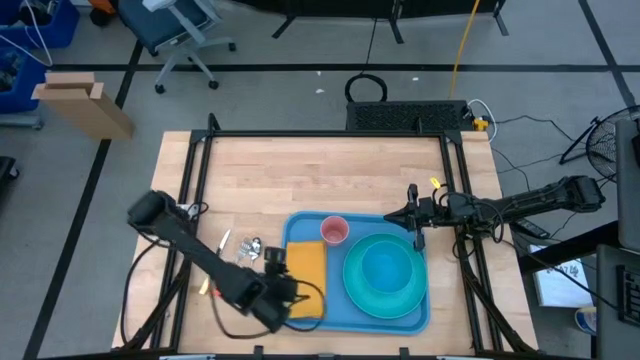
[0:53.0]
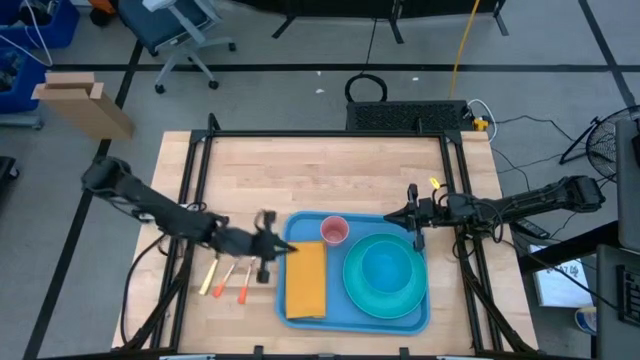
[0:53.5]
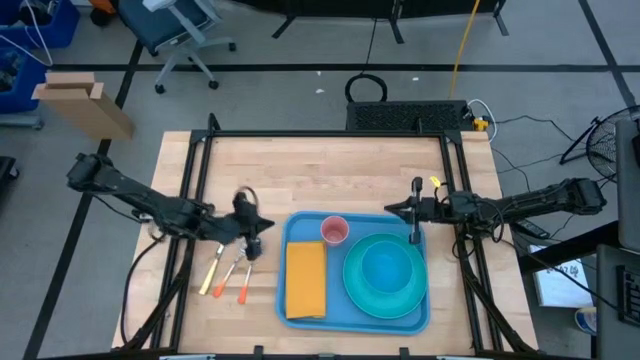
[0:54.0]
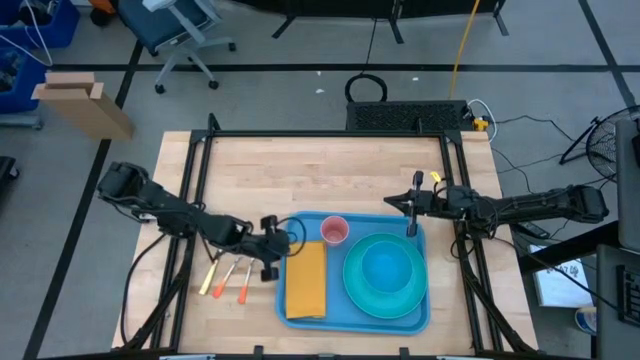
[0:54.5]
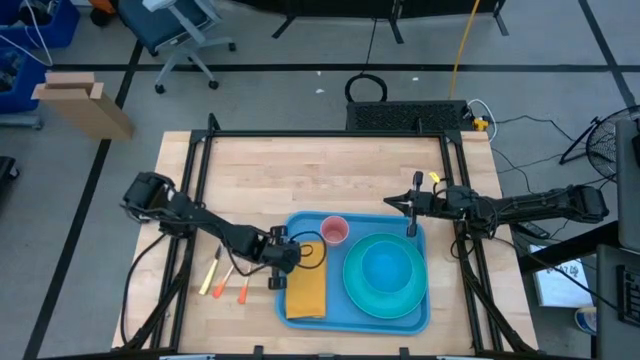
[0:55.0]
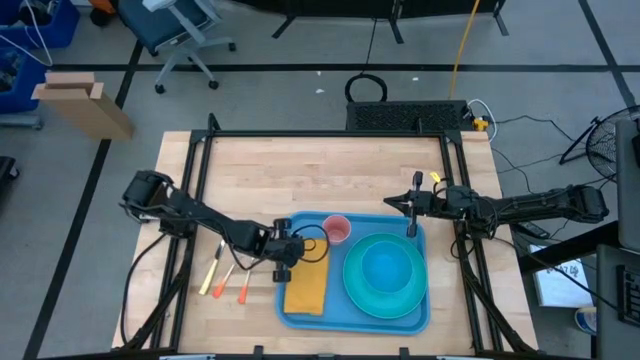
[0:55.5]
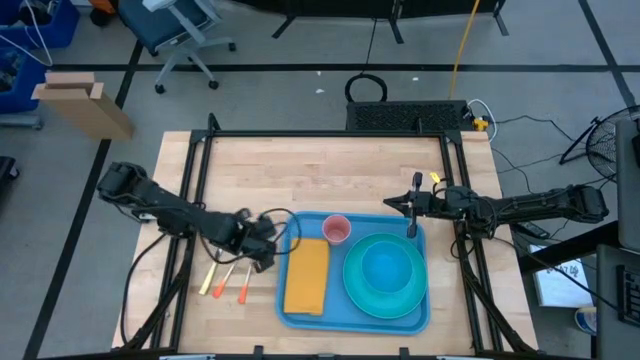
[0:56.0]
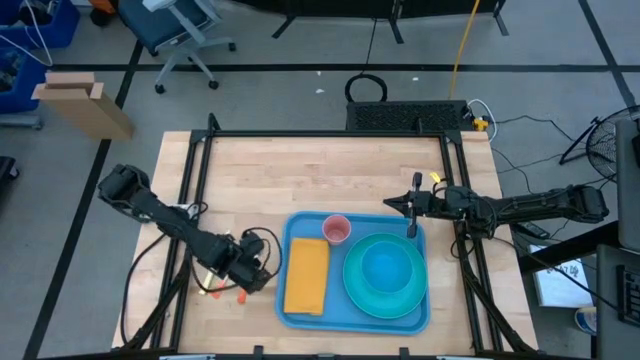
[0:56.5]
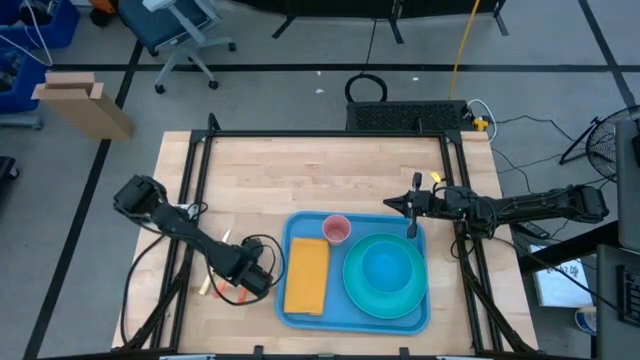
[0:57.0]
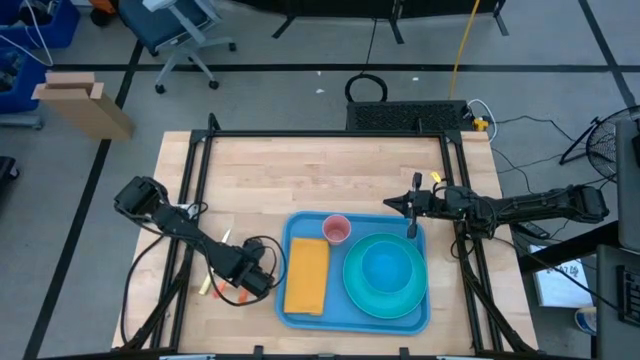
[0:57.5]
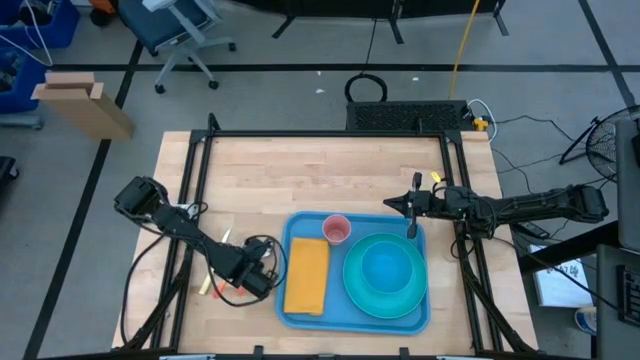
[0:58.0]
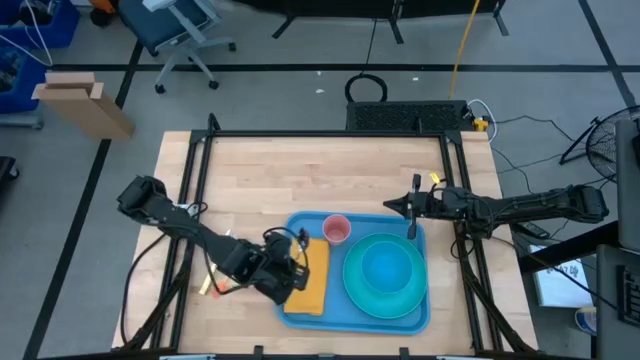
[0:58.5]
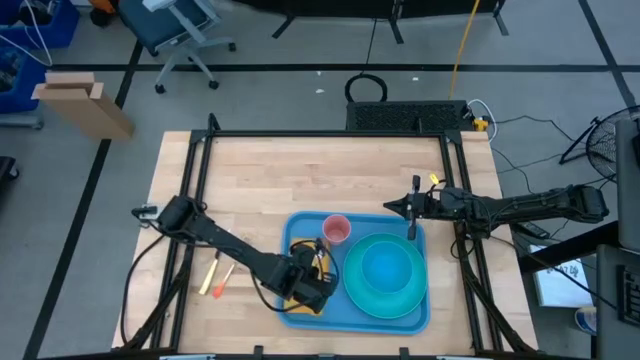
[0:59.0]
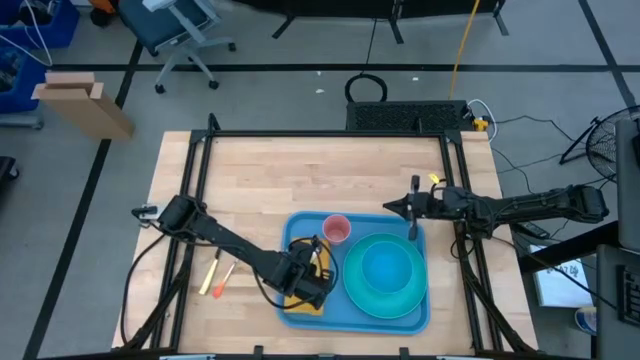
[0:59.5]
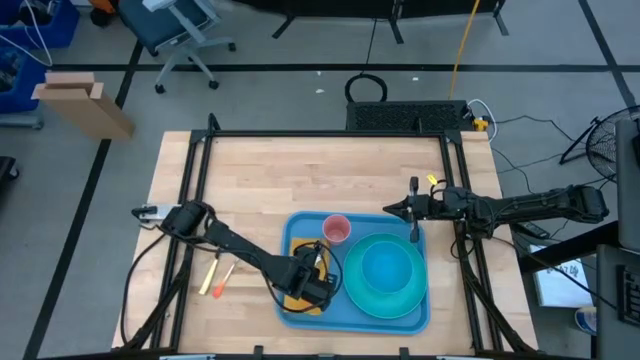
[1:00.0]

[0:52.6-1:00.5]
Task: Set up tray
Put the spoon on top of the yellow napkin

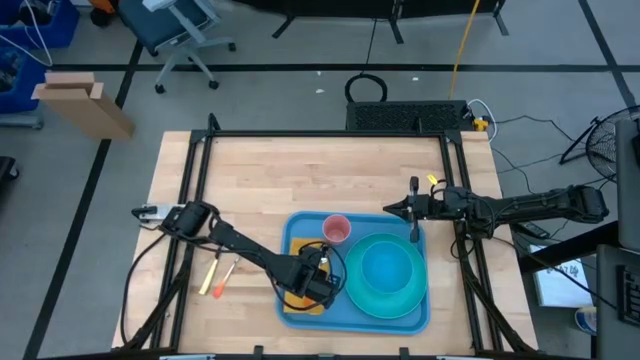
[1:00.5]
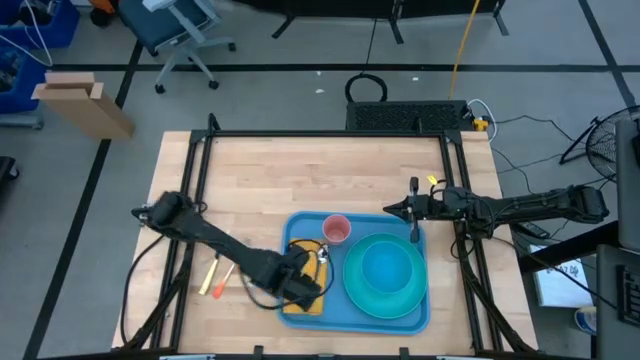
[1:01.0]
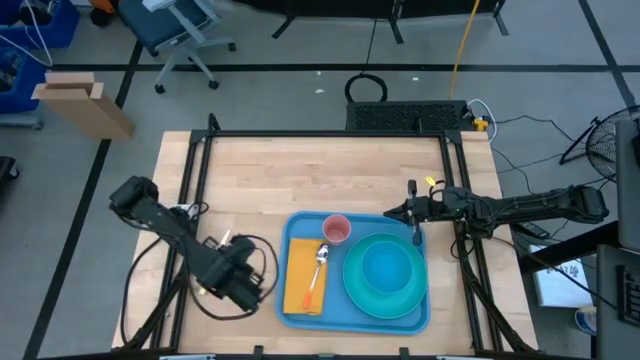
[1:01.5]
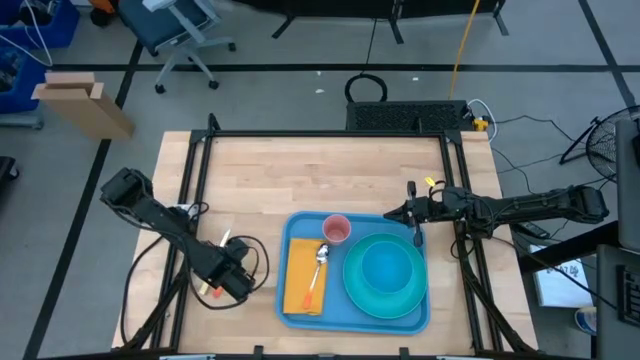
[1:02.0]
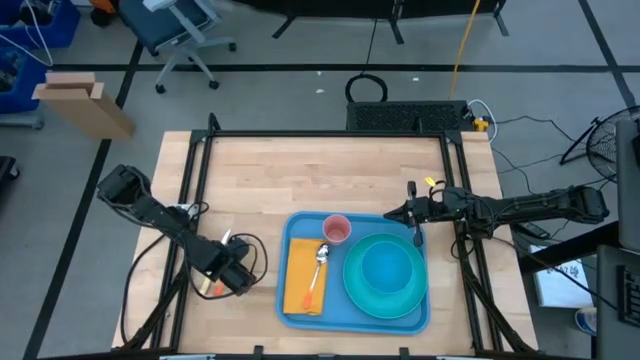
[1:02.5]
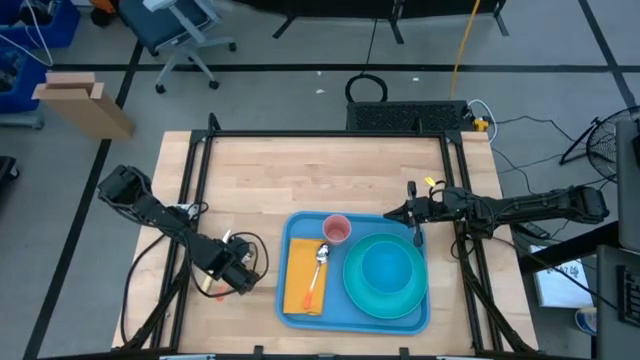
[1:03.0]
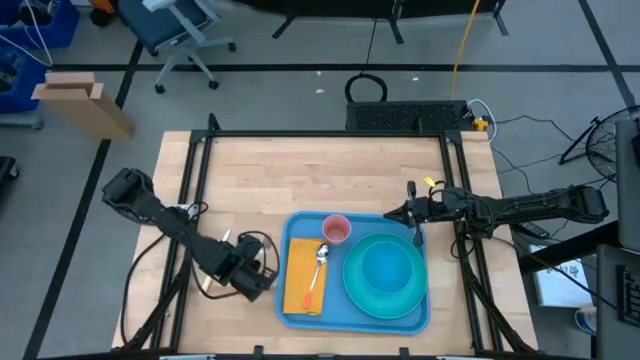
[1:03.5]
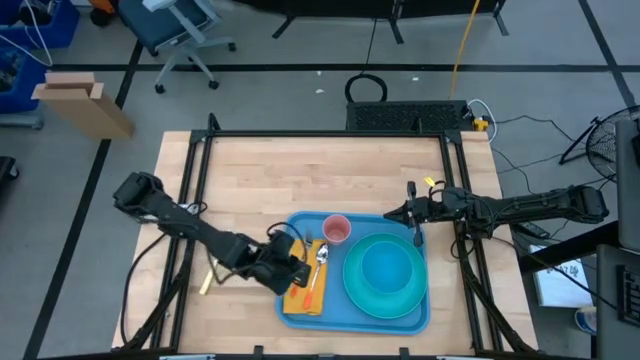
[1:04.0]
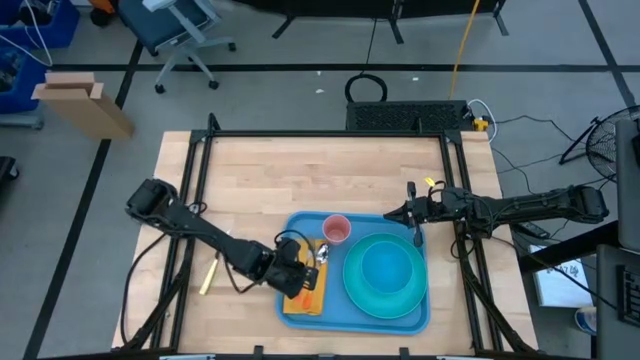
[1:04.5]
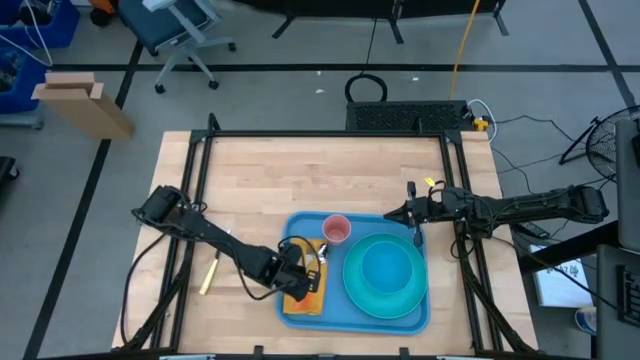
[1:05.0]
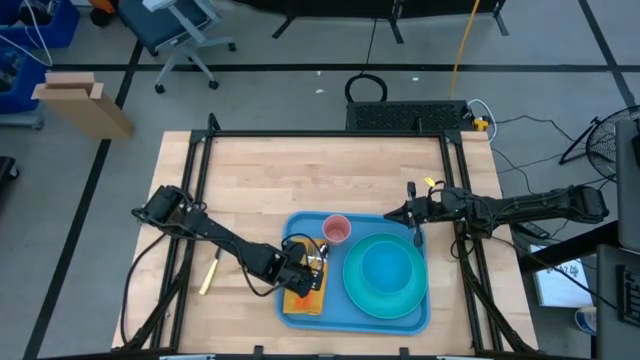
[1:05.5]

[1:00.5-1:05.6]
Put the fork on top of the yellow napkin

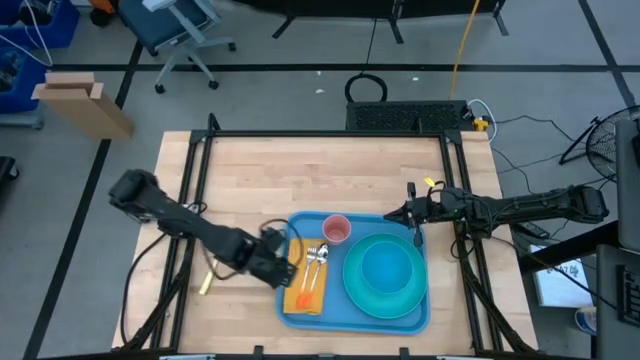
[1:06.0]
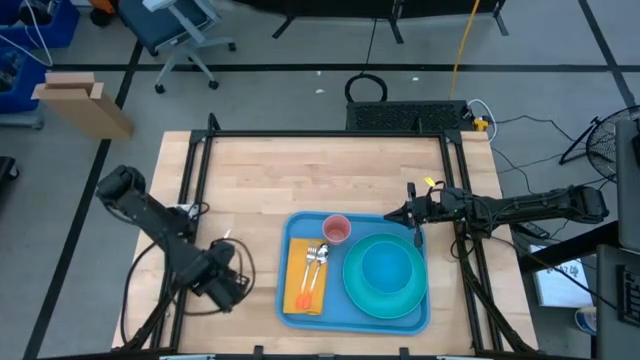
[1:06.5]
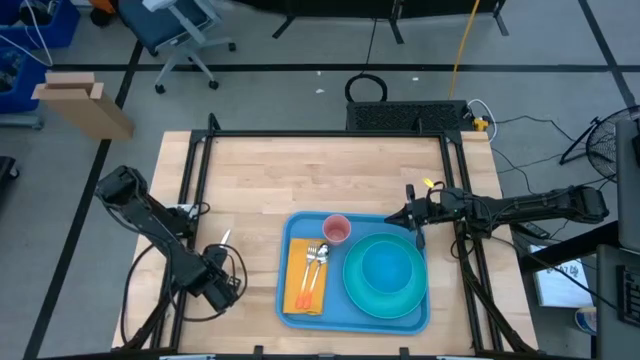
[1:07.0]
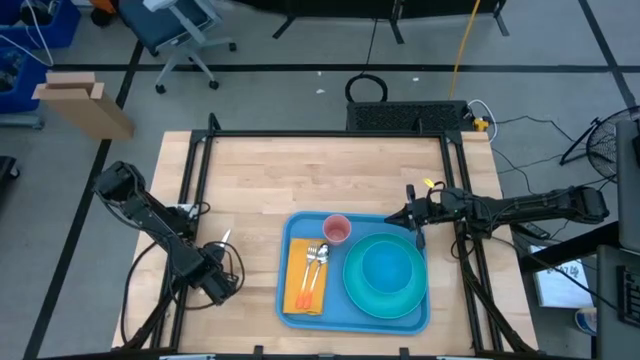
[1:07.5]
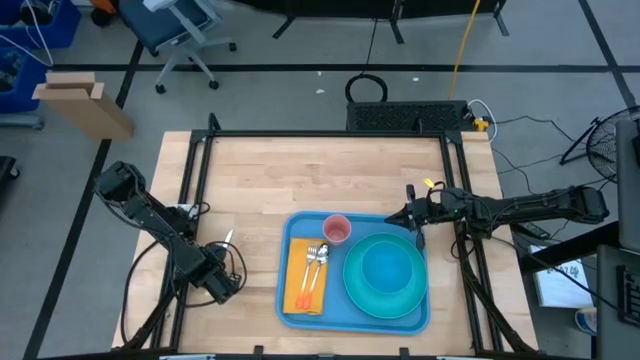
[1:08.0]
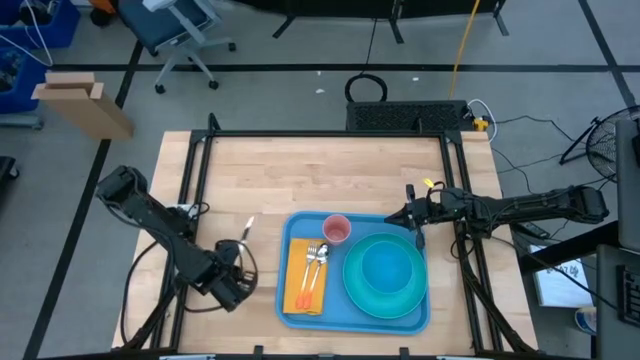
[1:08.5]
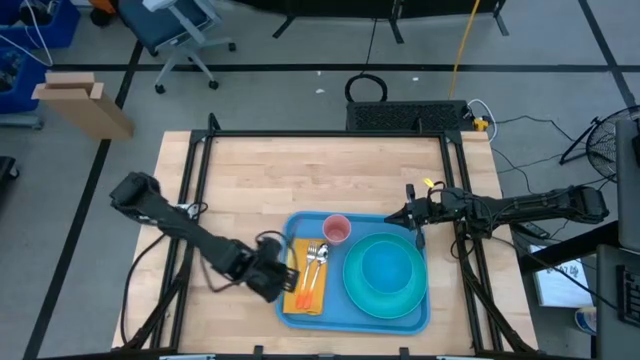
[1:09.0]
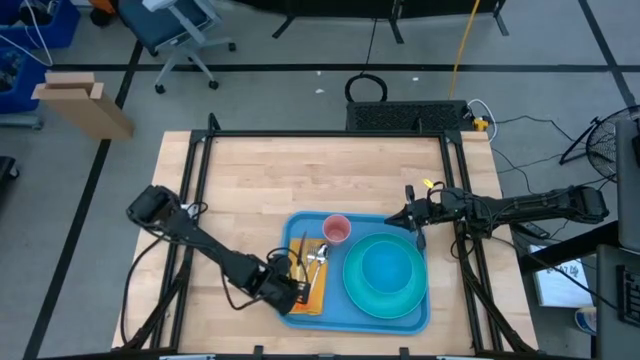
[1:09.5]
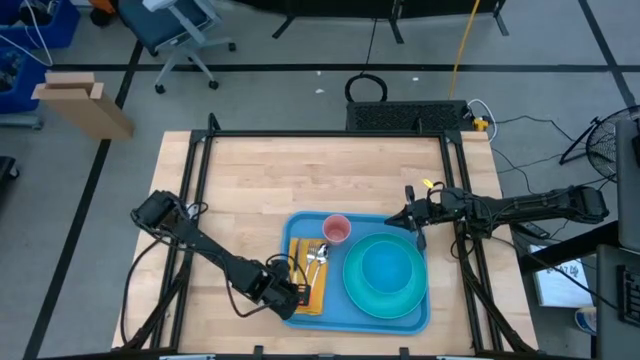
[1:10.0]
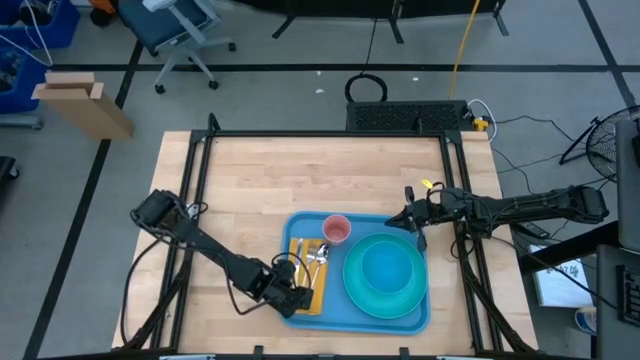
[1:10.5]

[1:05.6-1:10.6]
Put the knife on top of the yellow napkin

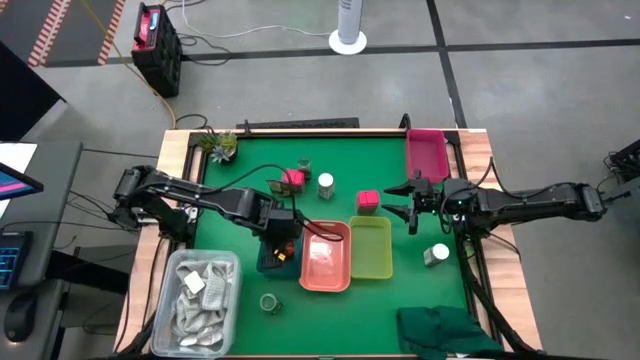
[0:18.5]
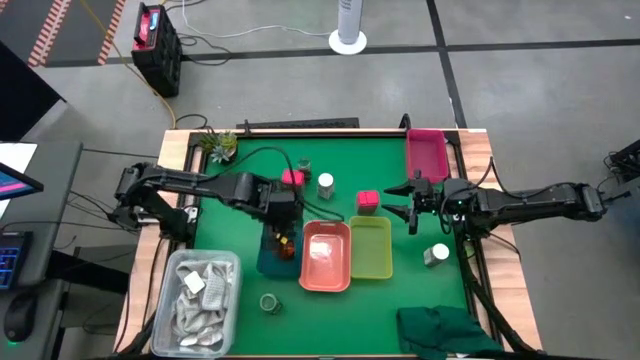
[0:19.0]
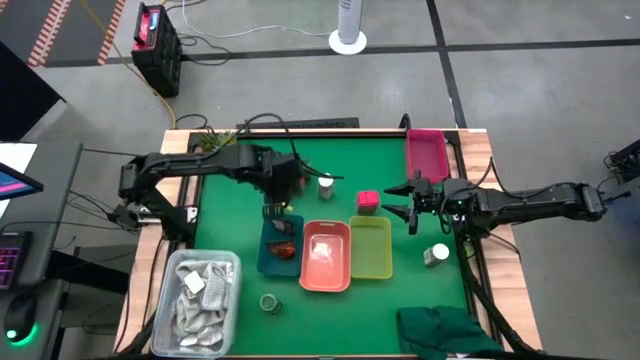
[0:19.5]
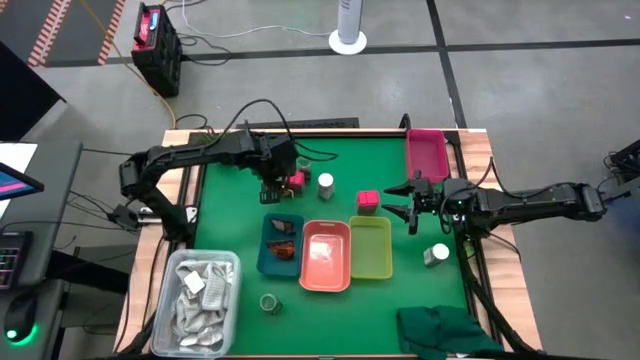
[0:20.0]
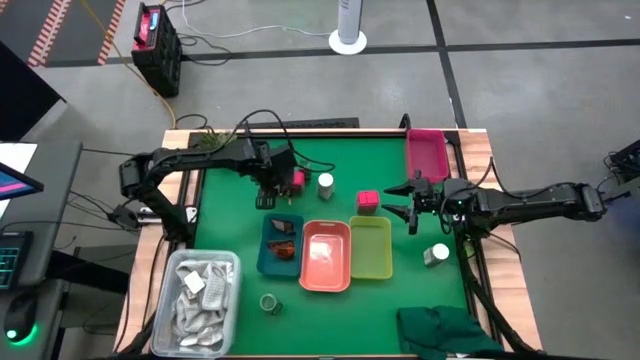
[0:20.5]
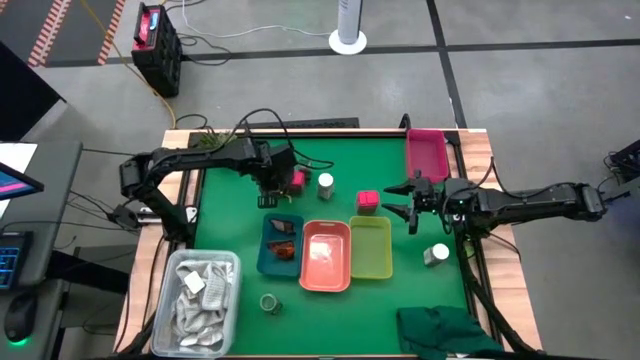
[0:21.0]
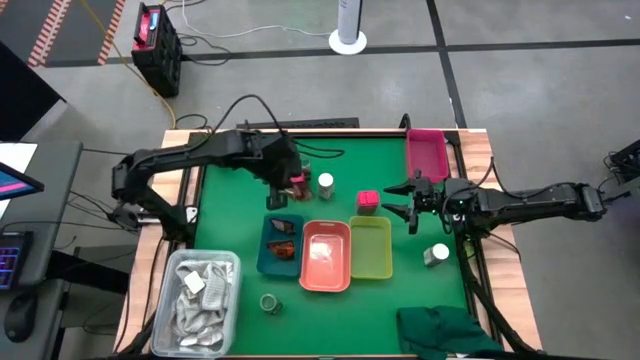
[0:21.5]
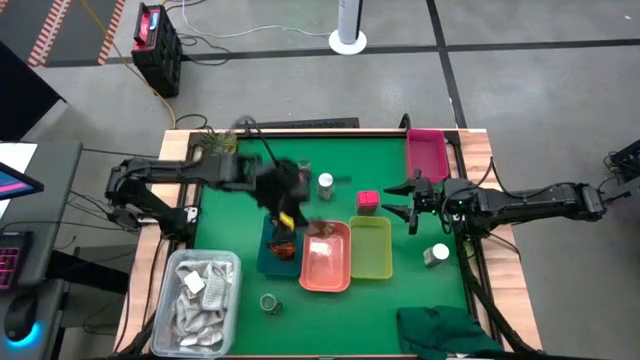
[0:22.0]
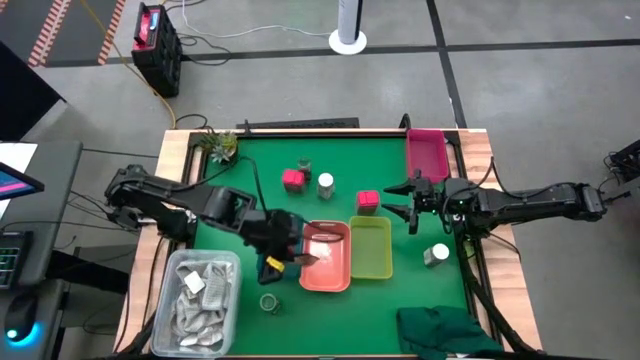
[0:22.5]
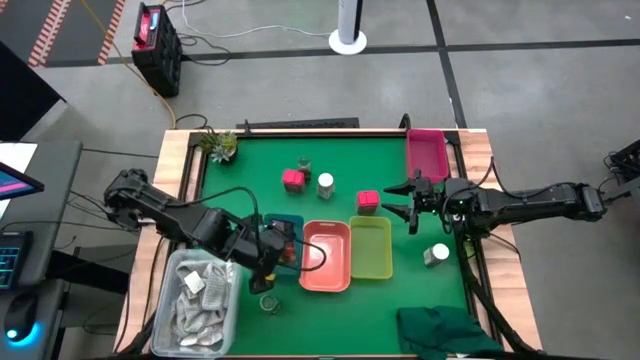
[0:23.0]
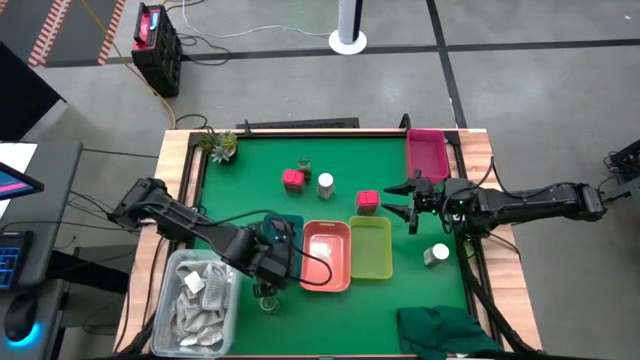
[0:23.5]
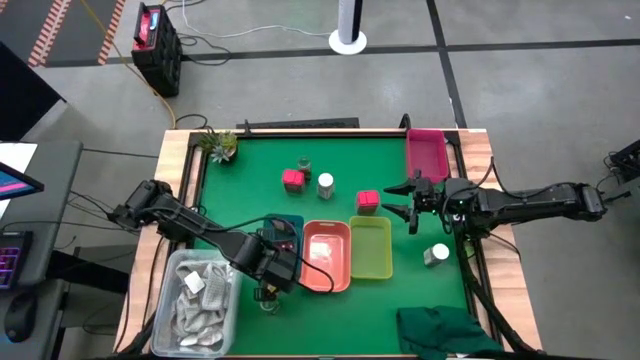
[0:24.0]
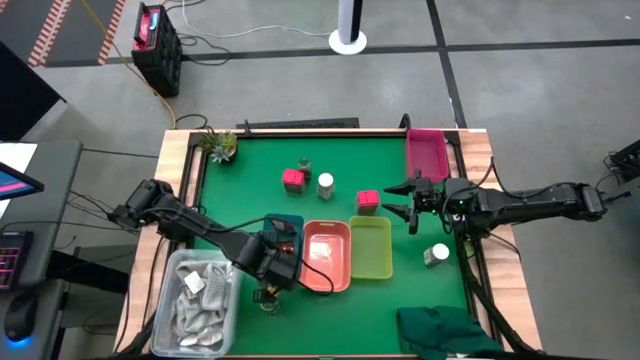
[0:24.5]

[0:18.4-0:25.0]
Task: Sort spices by type
Put the orange seasoning pack into the blue bin
